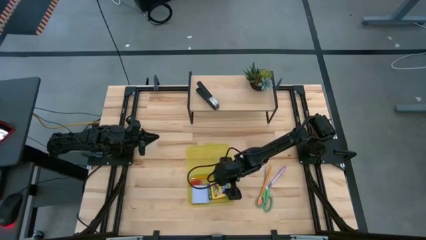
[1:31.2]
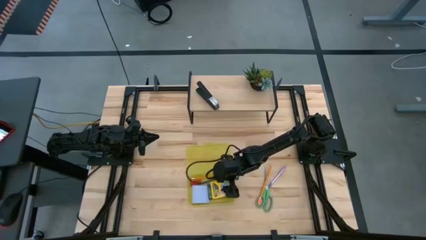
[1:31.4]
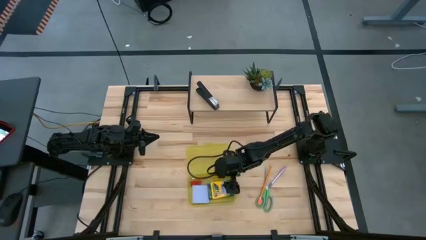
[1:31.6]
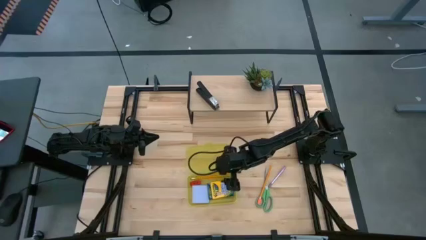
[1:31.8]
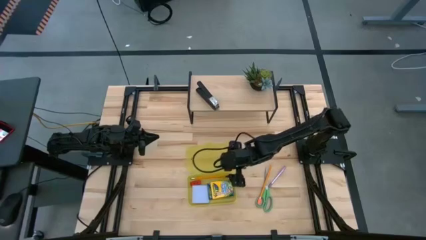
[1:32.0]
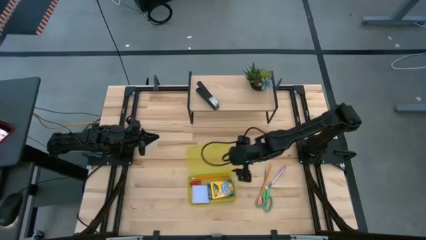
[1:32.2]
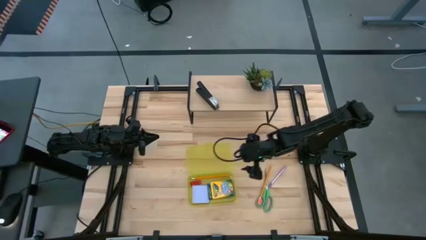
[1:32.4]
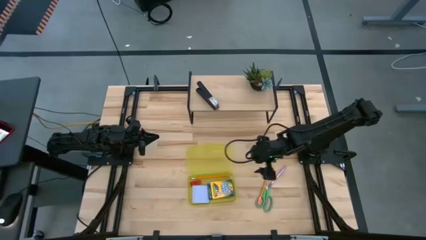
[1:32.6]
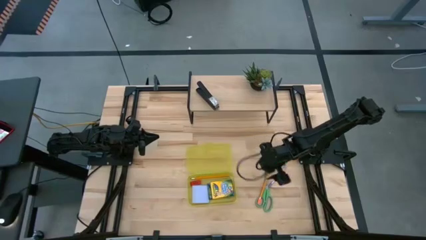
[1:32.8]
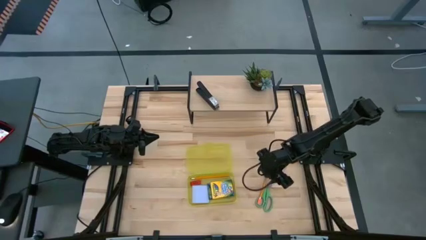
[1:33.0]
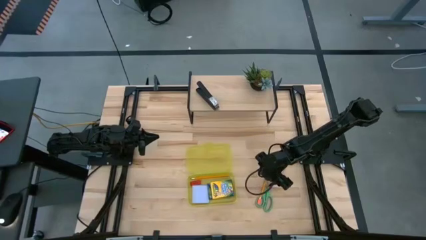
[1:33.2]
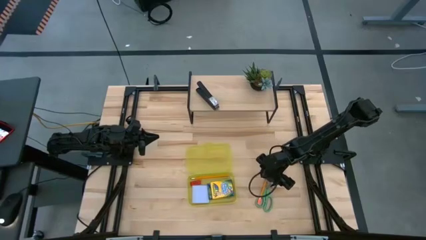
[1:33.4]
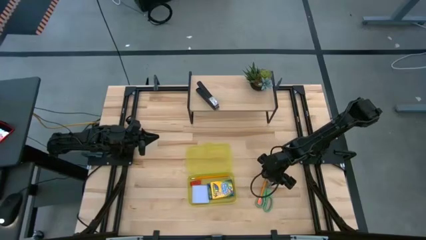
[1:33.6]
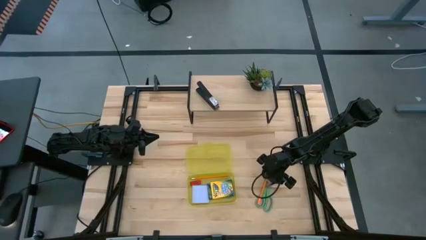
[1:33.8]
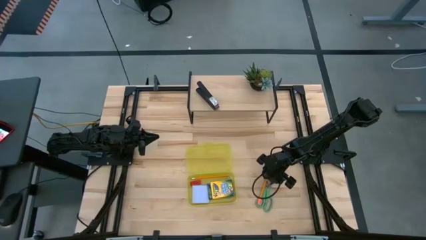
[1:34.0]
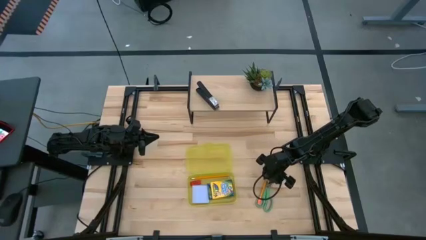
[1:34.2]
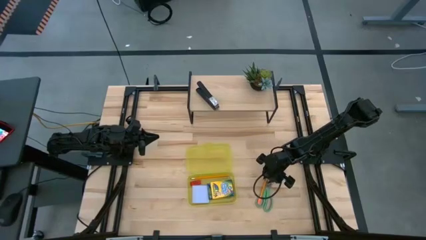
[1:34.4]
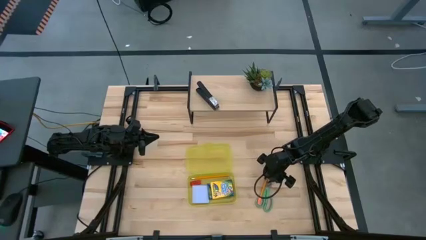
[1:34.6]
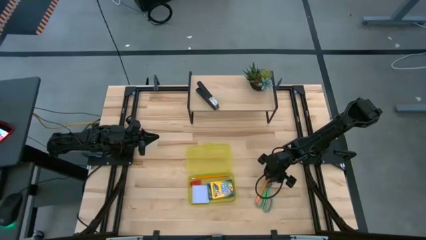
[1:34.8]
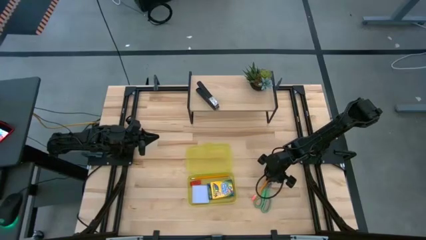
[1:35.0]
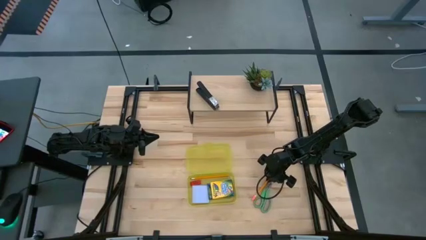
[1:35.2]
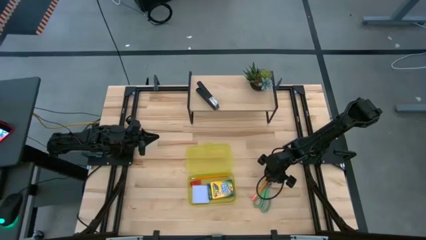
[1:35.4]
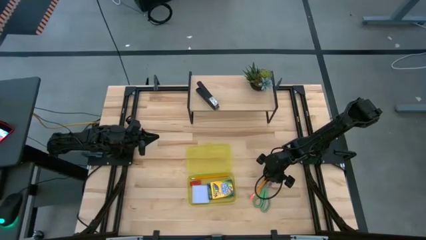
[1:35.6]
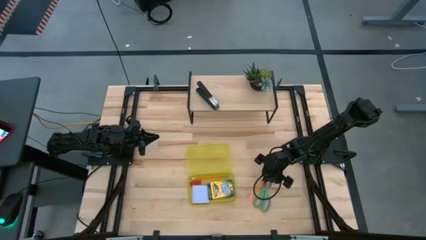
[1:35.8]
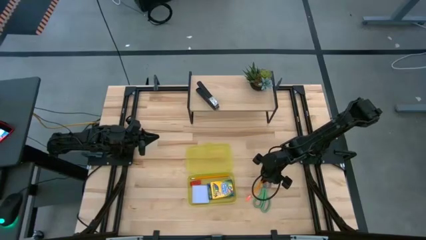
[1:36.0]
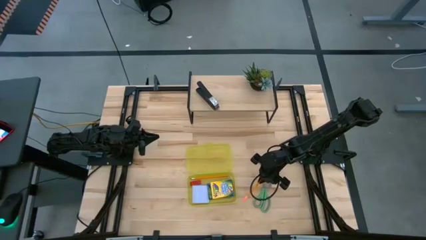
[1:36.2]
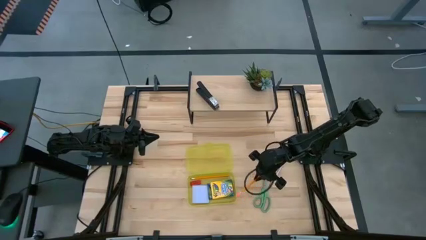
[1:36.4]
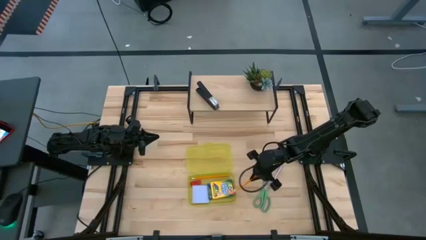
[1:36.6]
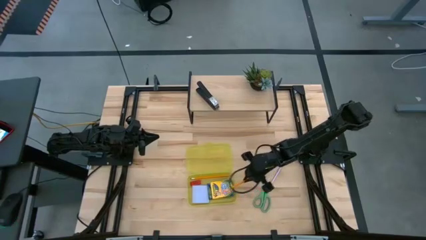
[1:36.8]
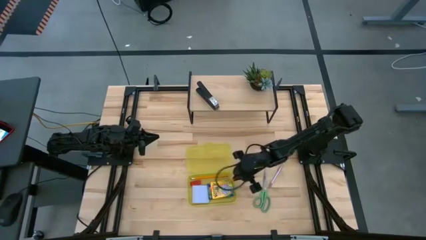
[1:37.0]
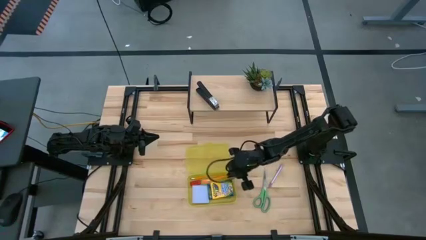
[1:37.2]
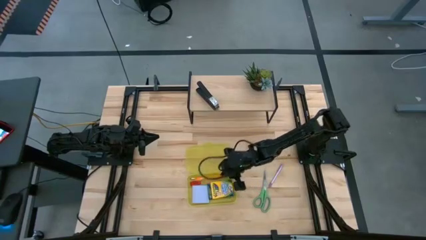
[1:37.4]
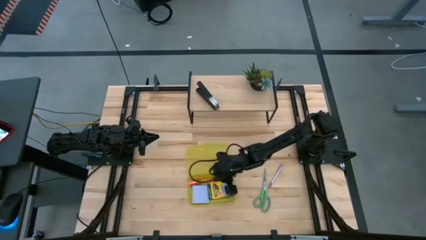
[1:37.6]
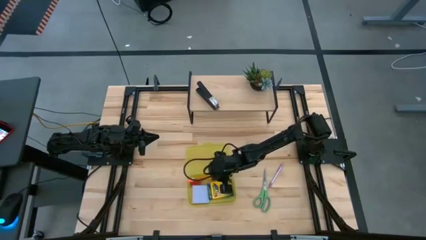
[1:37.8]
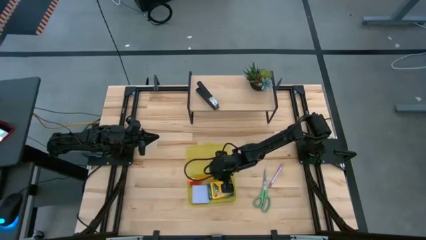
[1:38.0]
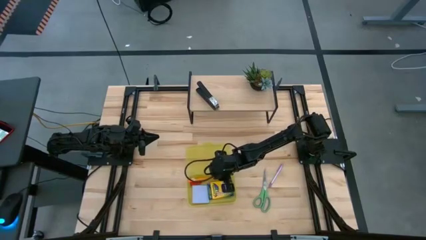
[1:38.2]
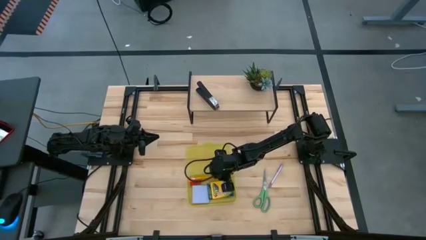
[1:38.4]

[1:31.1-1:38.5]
Task: Pack school essentials
Put the orange pencil into the yellow supply box

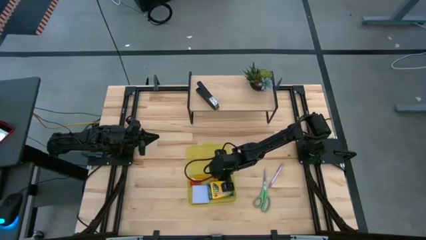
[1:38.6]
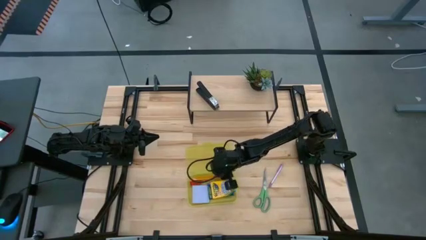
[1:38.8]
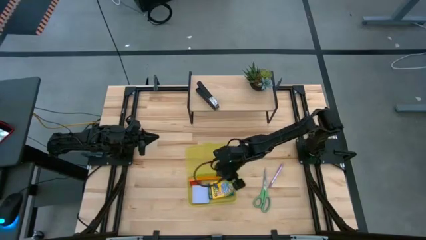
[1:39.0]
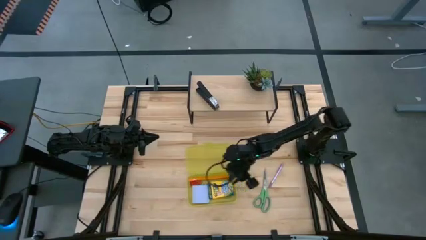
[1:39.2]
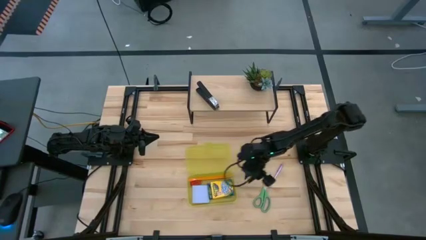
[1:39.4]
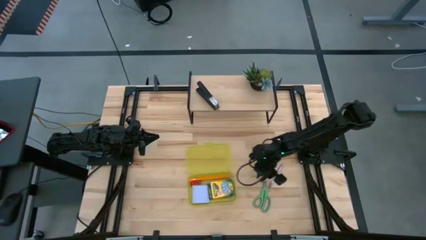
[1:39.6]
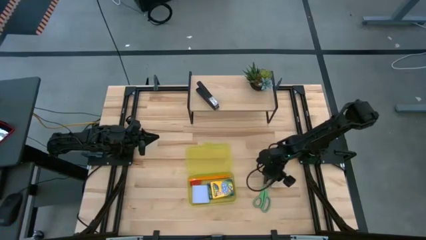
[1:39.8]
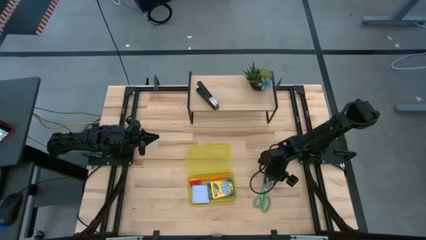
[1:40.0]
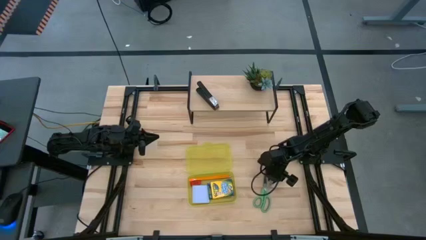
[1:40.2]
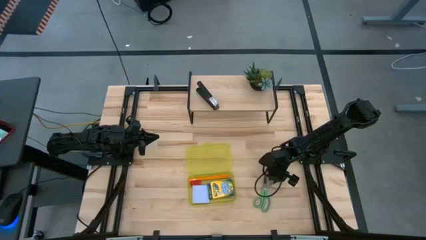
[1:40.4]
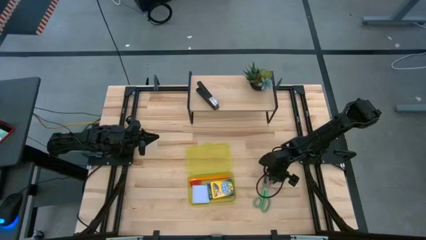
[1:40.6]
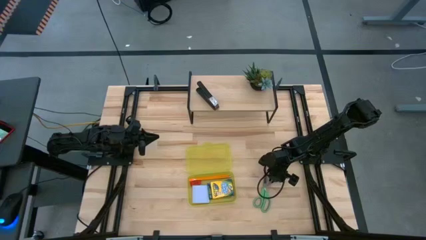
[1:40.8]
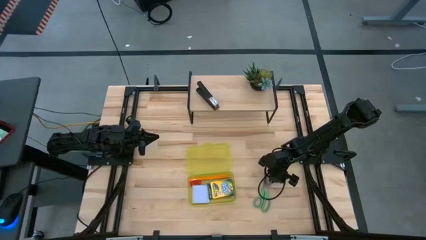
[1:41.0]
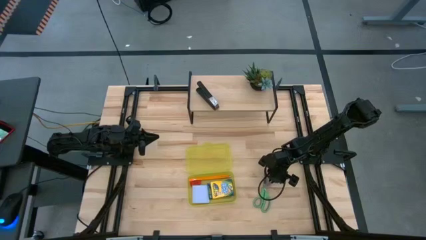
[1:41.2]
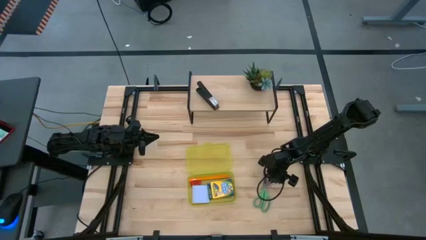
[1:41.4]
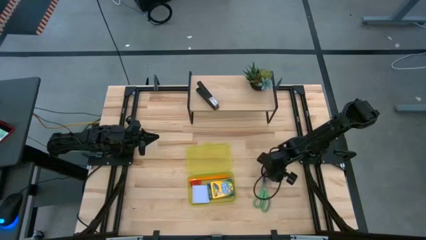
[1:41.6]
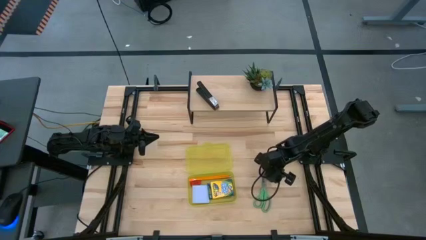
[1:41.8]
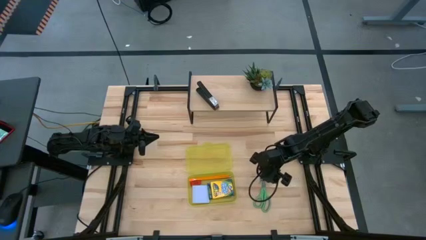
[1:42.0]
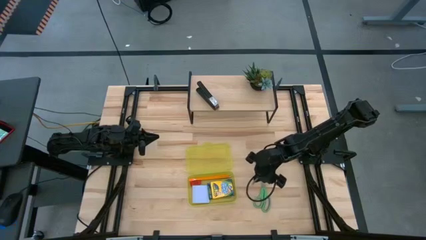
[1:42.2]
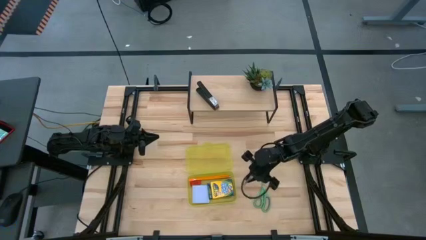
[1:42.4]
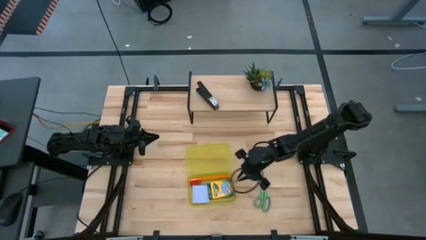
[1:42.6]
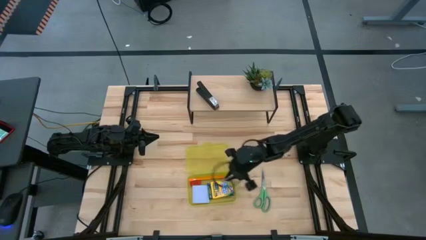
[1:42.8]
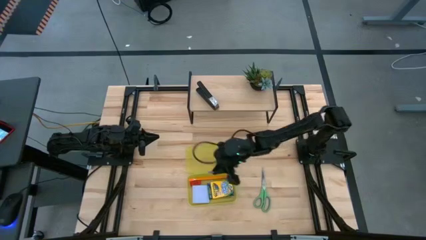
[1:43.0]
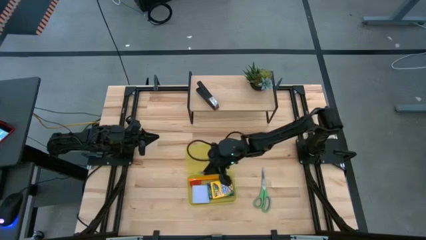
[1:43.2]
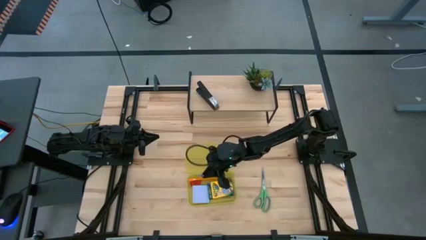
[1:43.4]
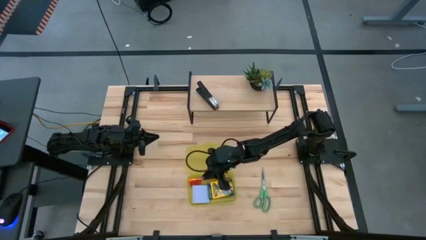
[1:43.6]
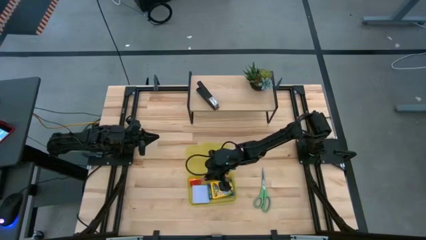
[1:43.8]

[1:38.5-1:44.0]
Put the purple pen into the yellow supply box
